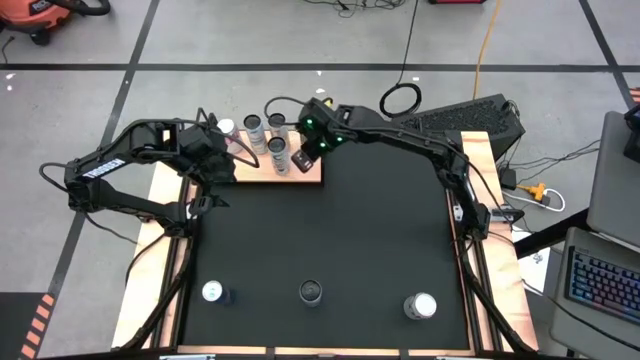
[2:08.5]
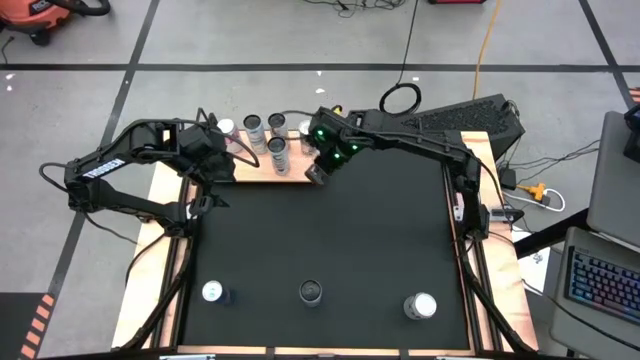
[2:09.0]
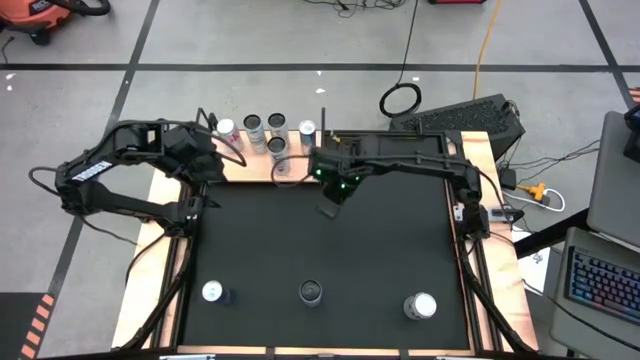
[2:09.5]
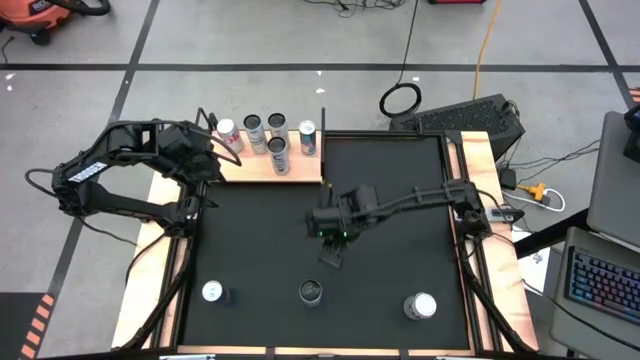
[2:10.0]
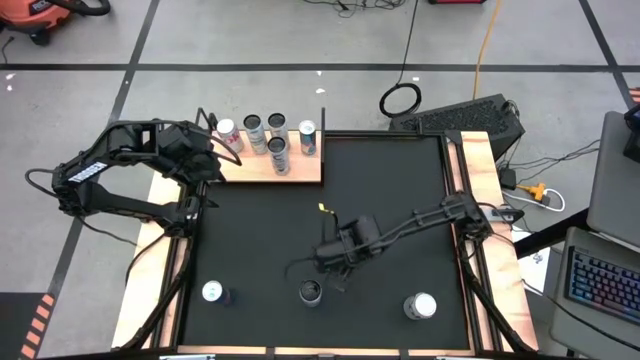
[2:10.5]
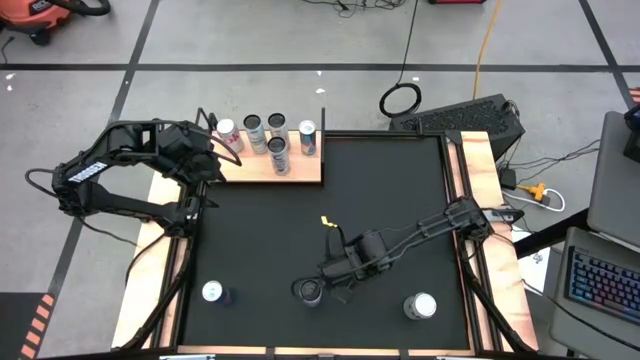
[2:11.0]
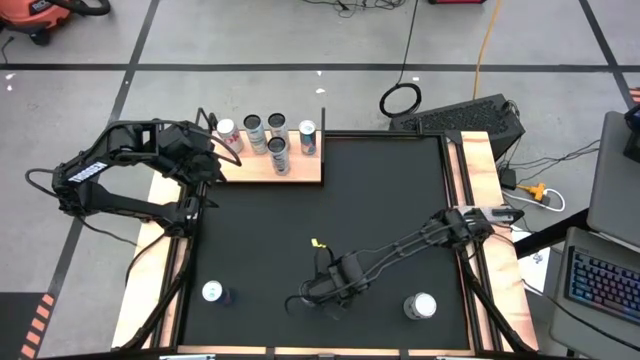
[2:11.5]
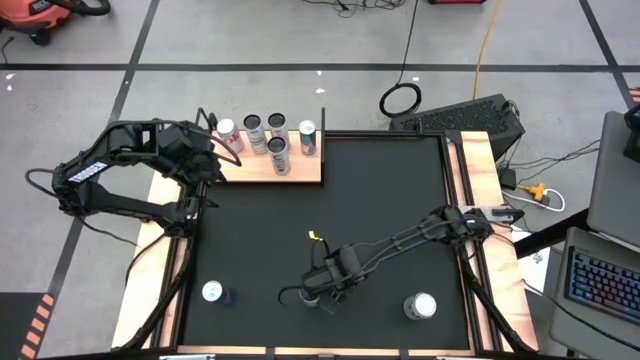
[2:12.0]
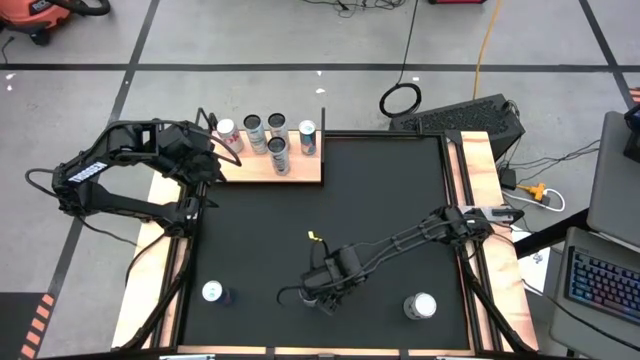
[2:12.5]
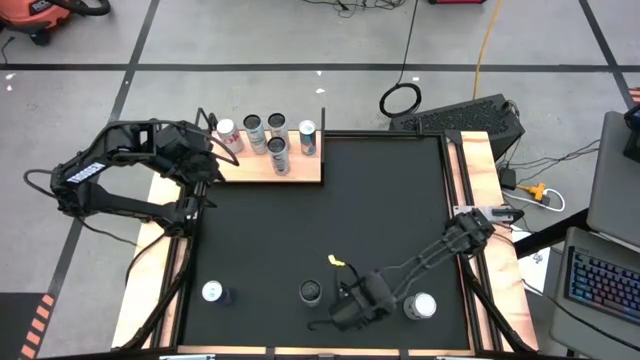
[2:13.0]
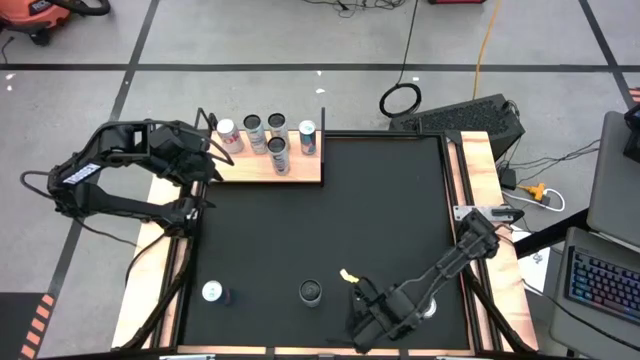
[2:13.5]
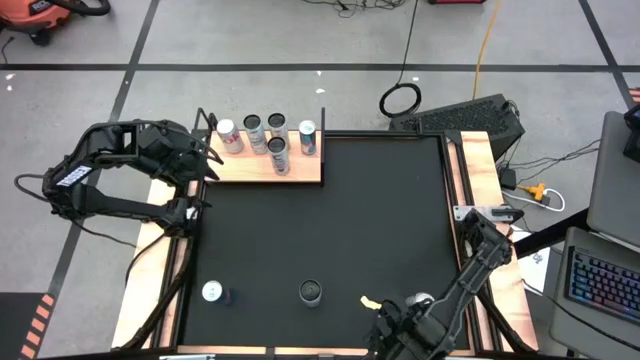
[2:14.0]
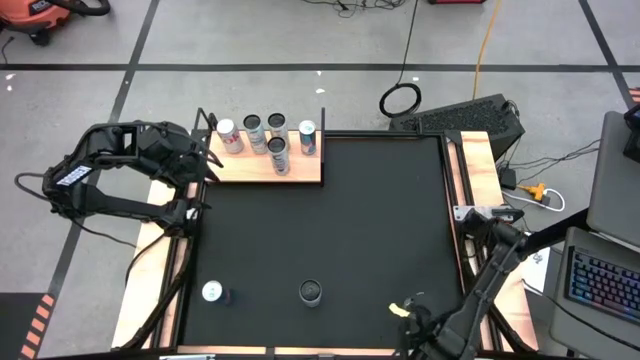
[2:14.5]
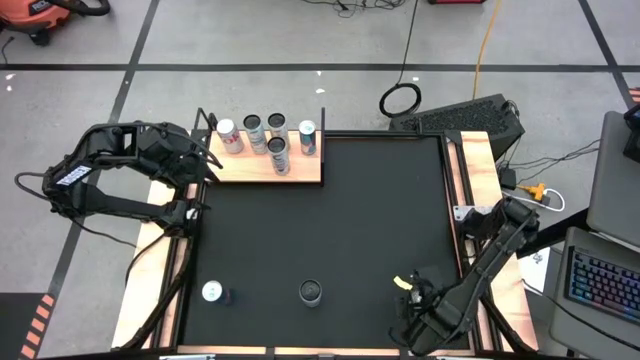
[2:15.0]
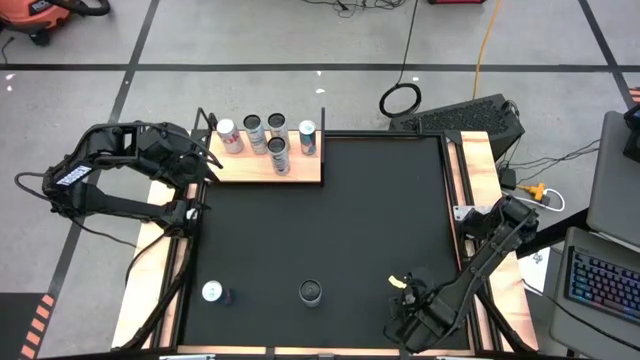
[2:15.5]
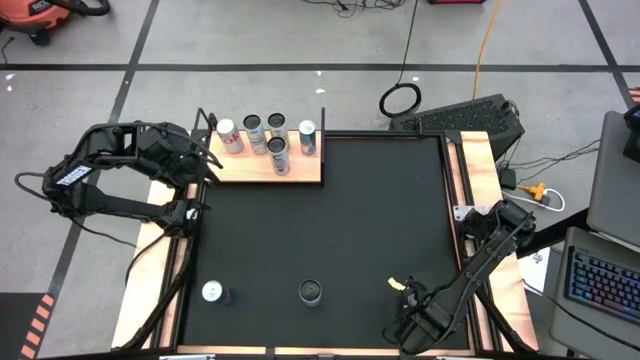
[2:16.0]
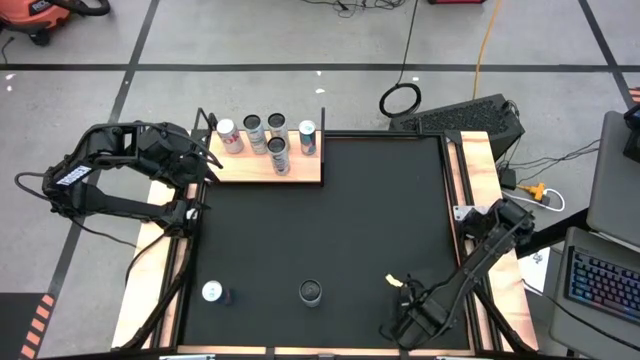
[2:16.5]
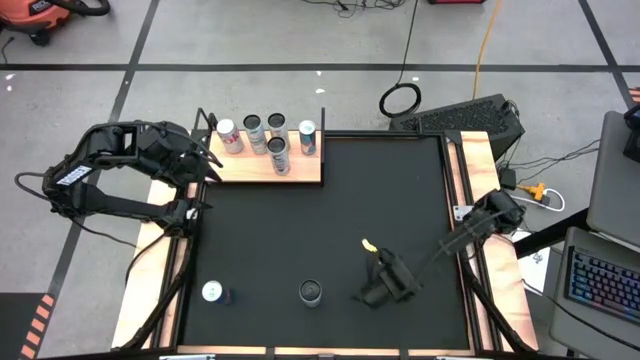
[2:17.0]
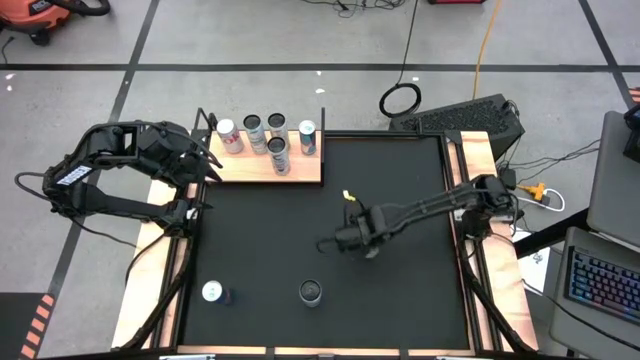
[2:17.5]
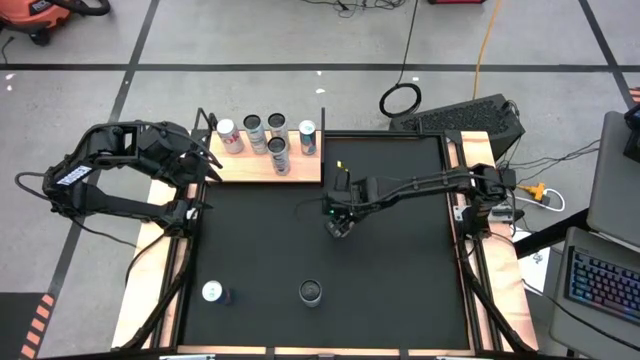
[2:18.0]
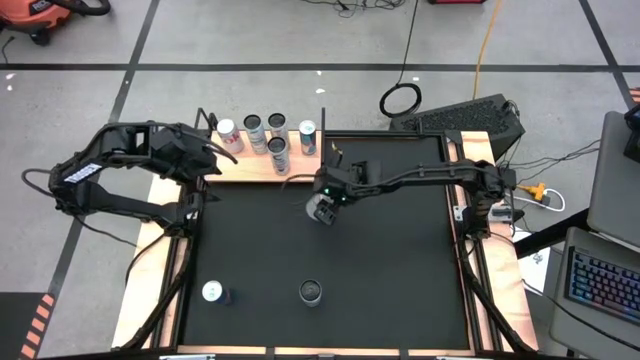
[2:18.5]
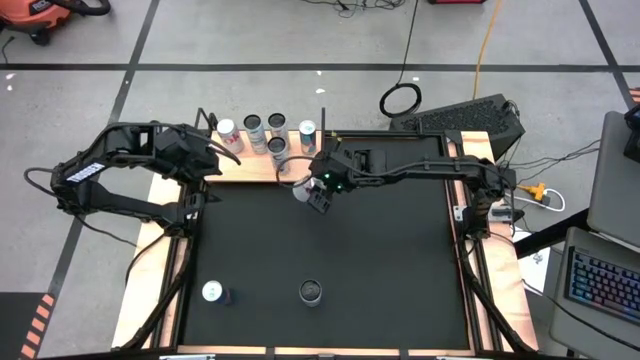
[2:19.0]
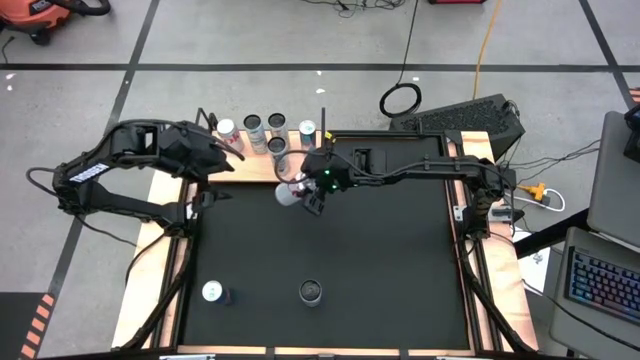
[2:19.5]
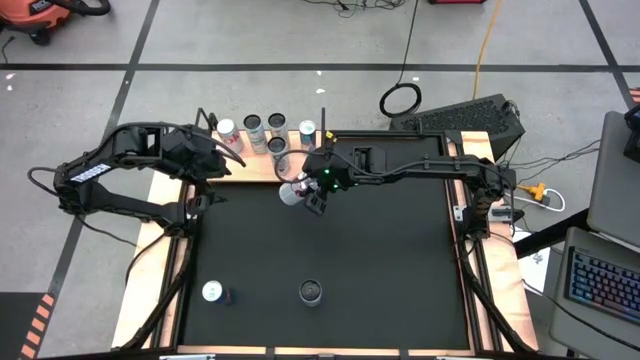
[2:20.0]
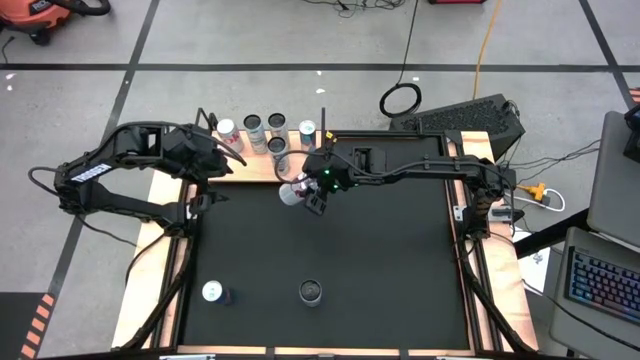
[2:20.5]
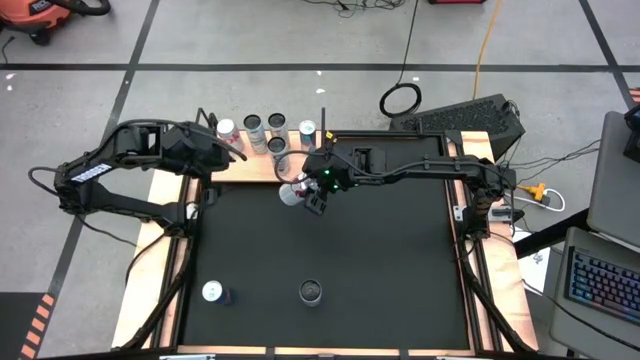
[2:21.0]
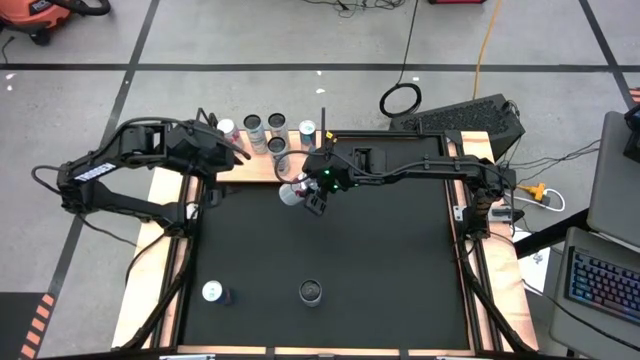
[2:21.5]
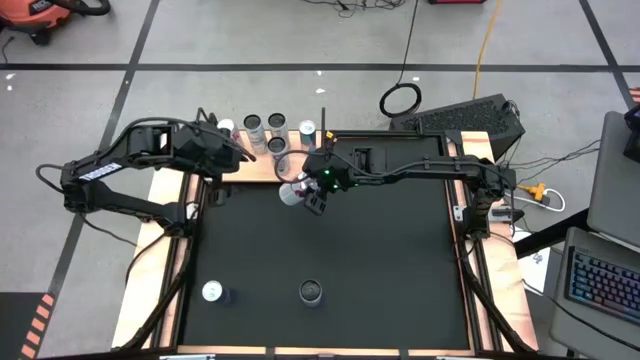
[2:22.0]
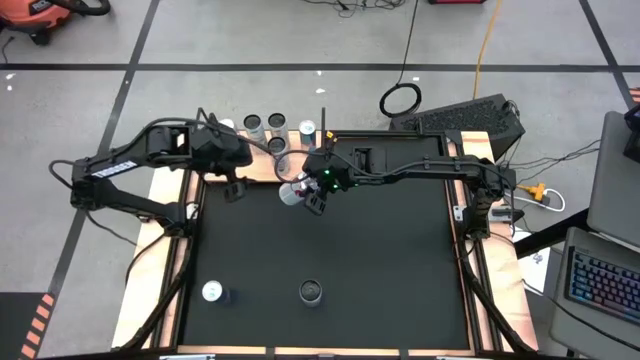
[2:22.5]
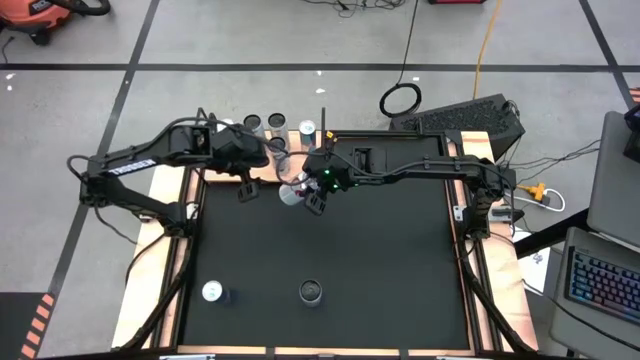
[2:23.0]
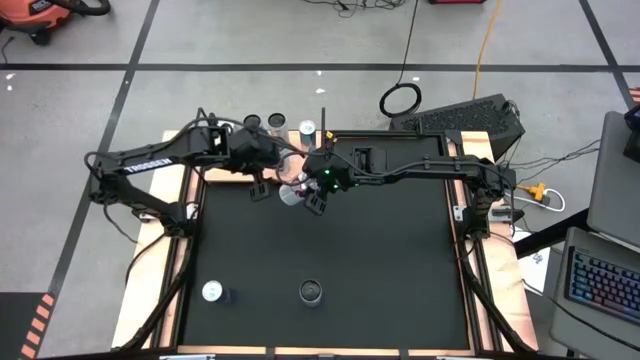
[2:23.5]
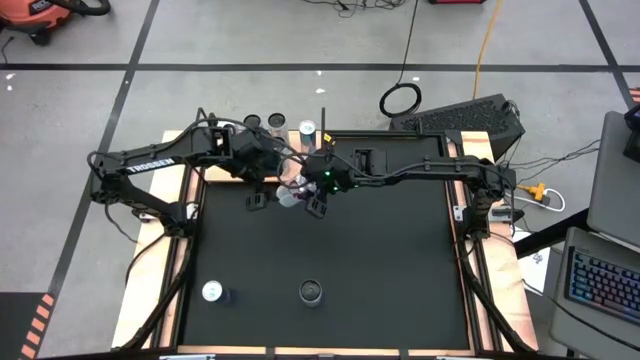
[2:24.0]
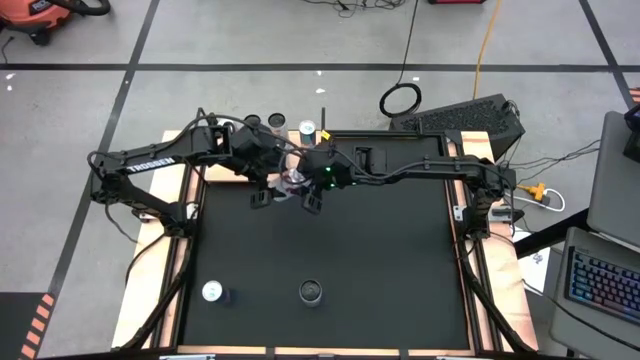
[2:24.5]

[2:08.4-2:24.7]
Task: Place canned beverage on shelf
Put the red silver soda can on the shelf aligned with the red silver soda can

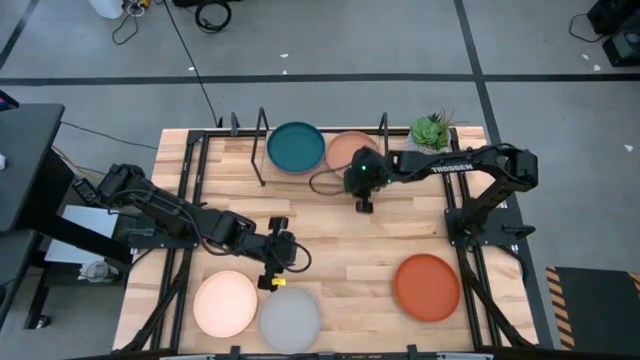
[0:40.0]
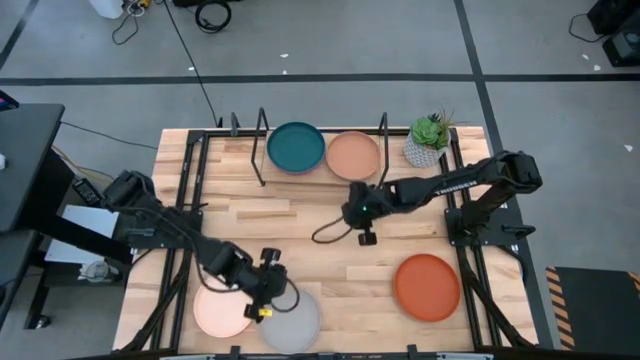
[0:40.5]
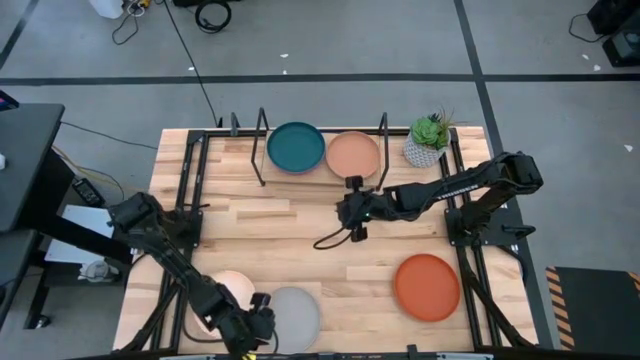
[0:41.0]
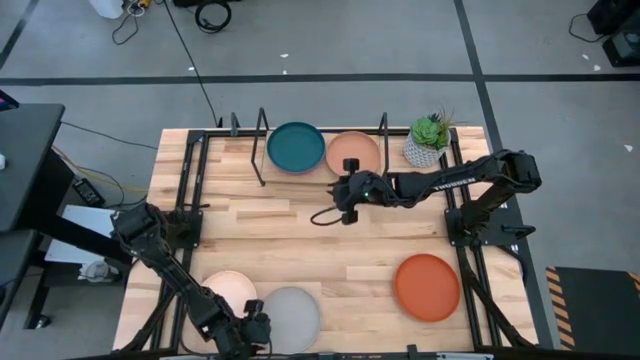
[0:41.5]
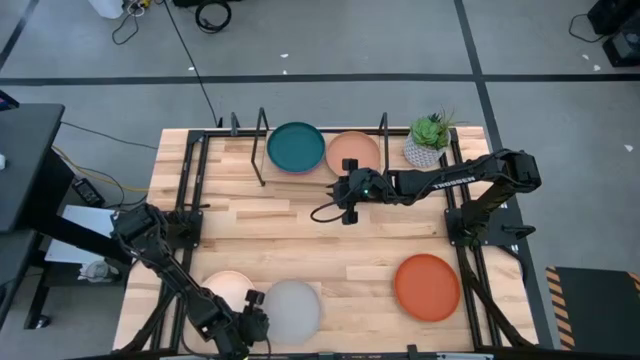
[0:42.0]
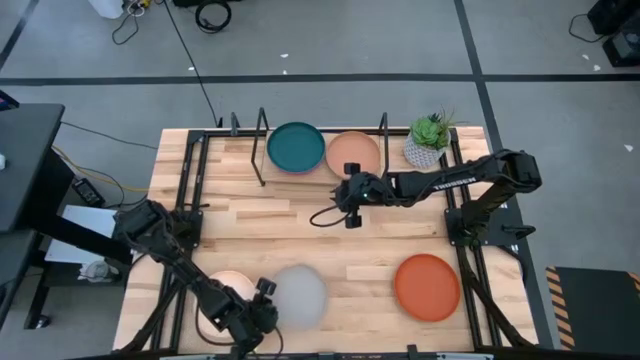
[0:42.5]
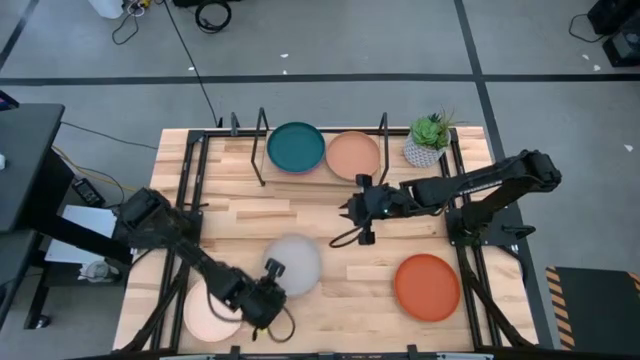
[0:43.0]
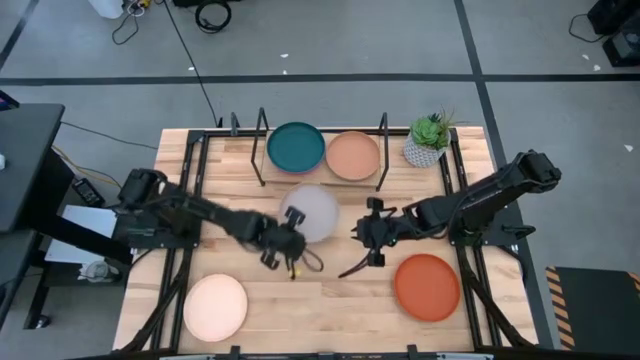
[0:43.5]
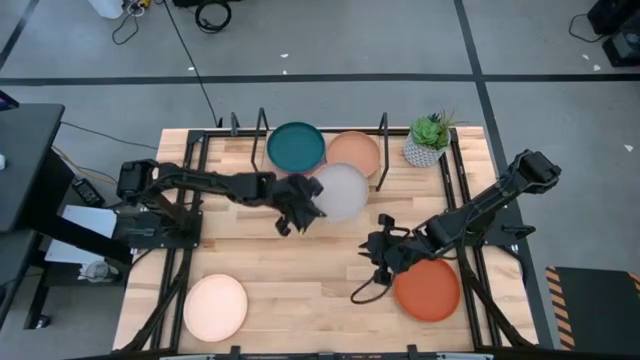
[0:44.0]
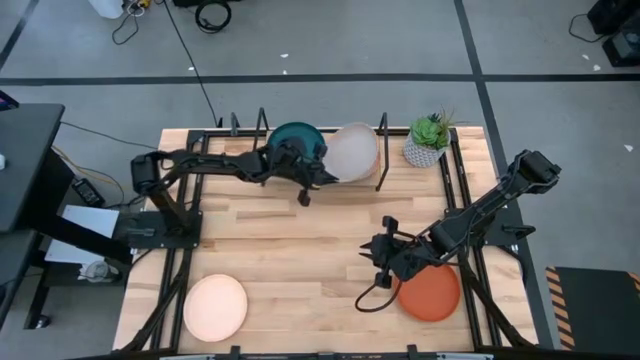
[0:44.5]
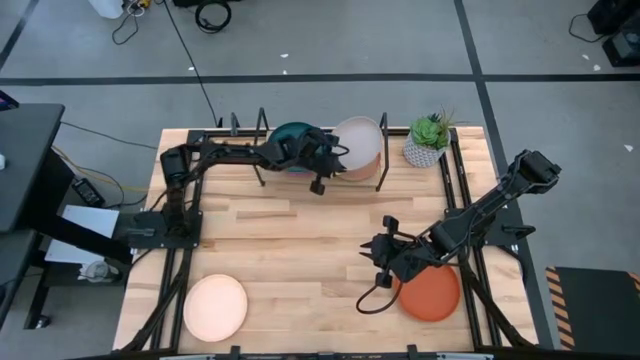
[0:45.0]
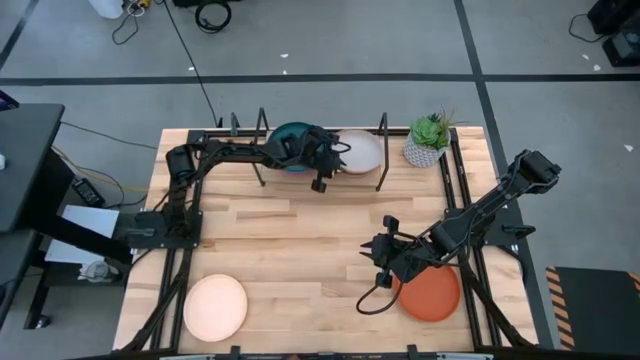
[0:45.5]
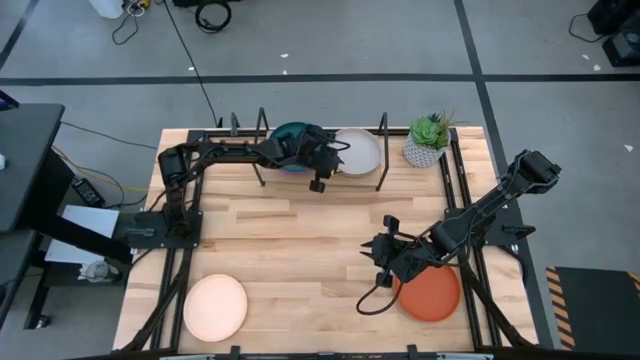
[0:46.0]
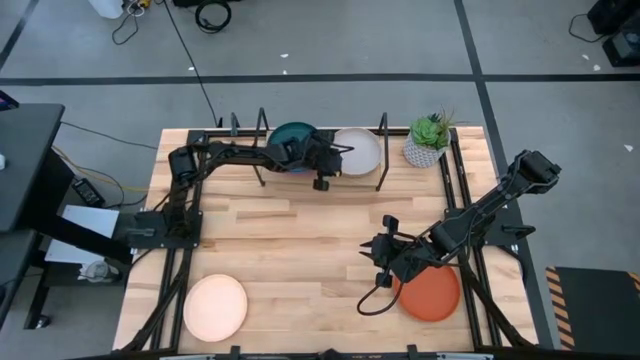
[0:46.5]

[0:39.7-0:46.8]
Task: Place and stack plates onto a shelf
Stack the gray plate on top of the brown plate on the shelf
